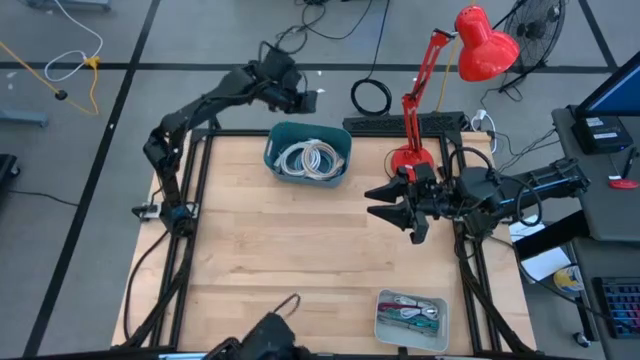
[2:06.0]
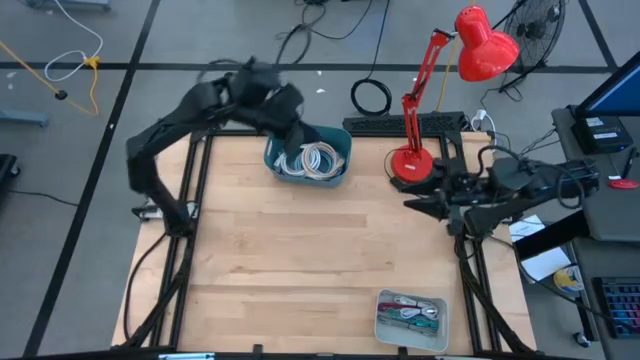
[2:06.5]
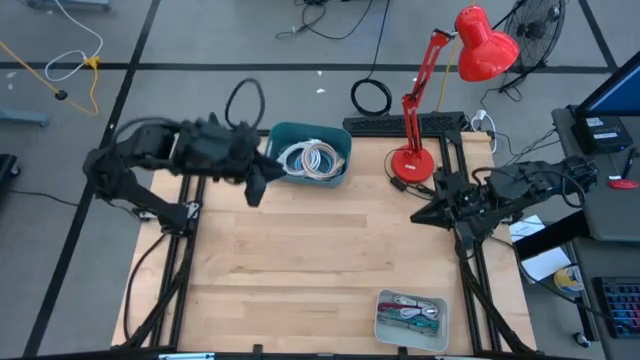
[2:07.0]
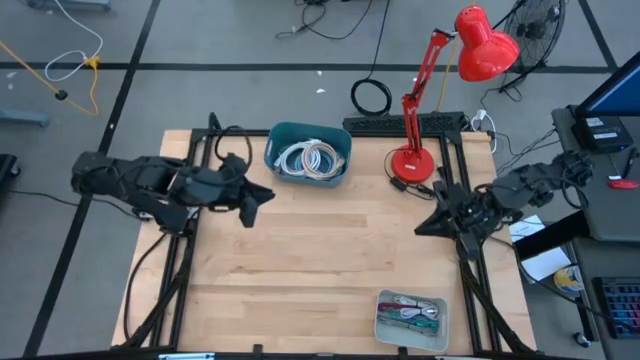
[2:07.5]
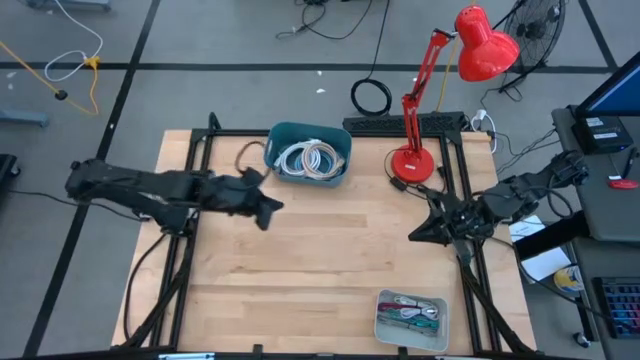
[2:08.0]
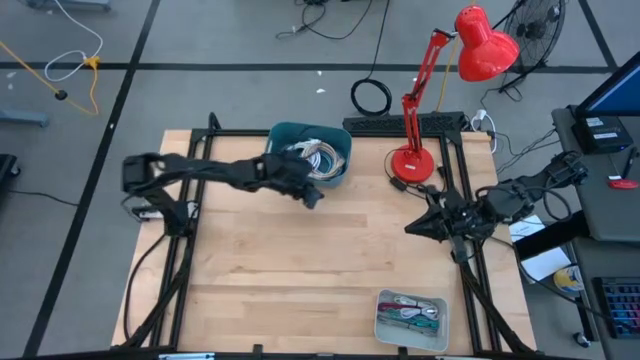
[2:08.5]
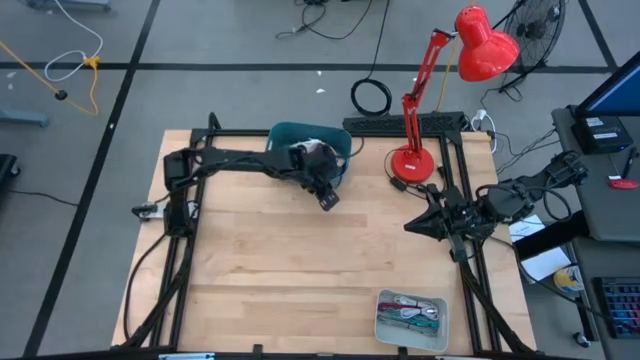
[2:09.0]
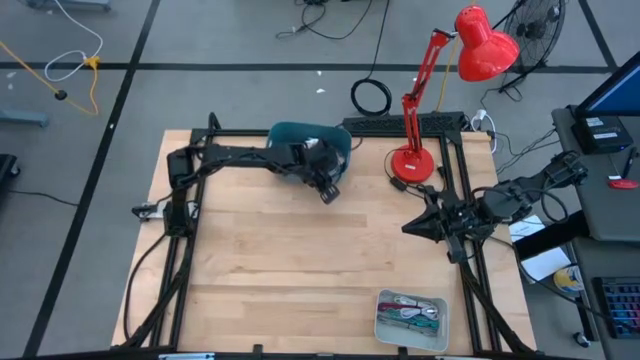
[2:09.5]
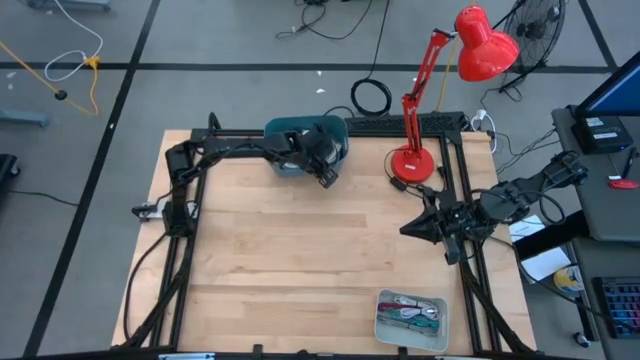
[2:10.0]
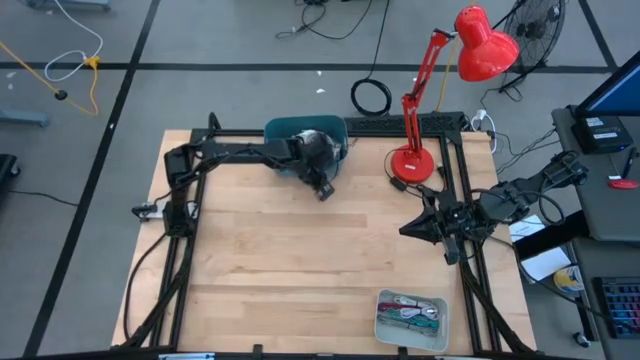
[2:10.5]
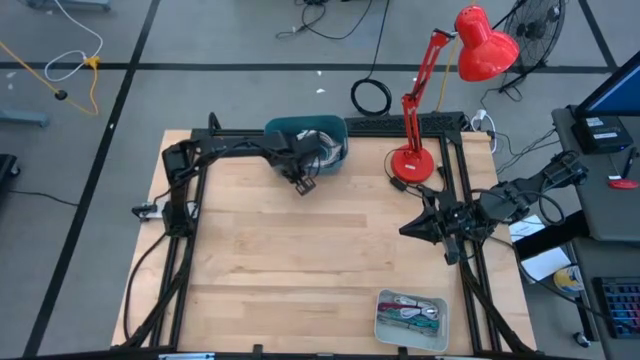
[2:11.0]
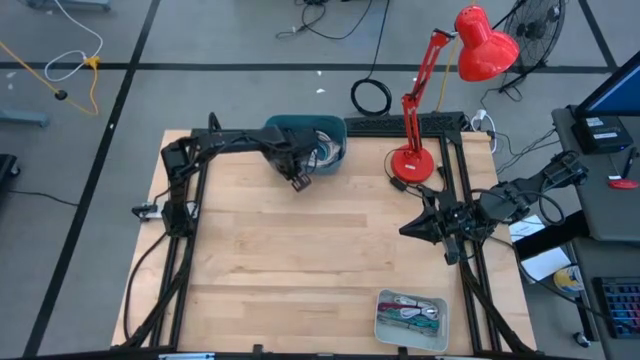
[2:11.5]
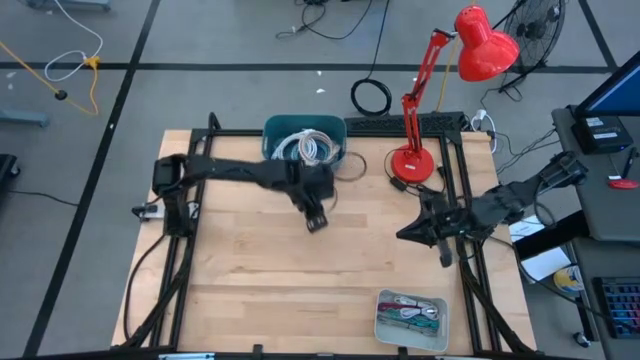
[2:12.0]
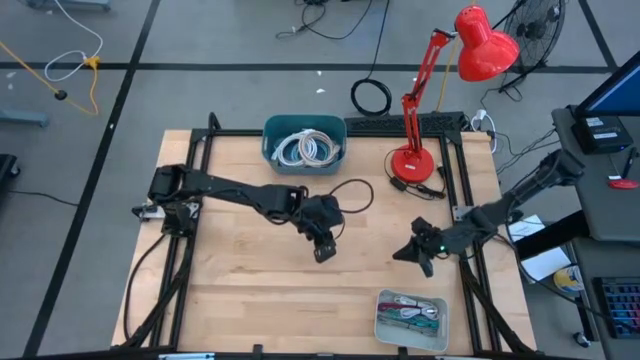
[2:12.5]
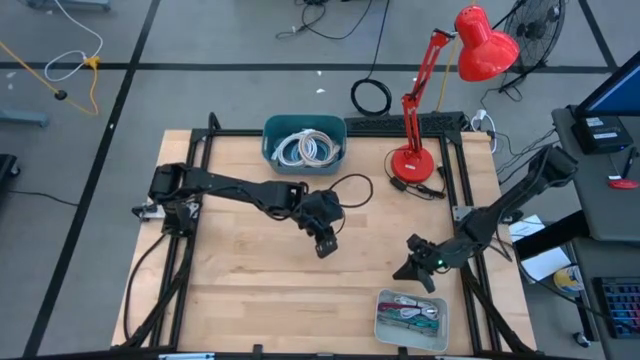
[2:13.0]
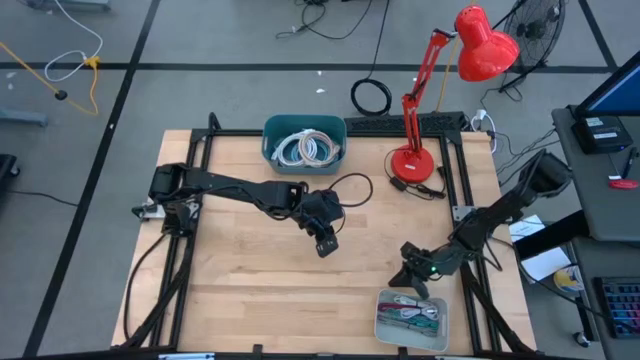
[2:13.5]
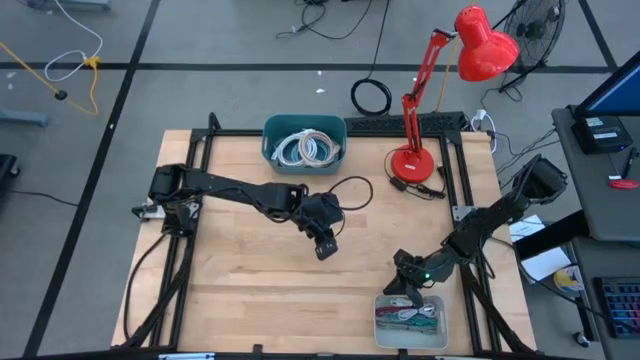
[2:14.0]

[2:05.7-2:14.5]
Task: Sort cables into bins
Adjust the bins on the table

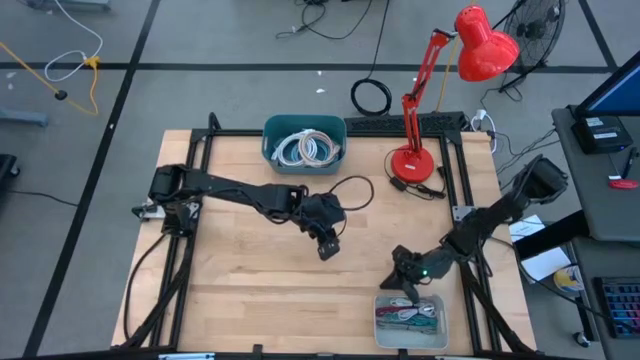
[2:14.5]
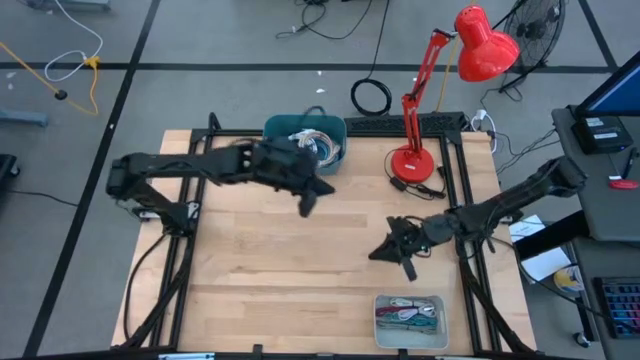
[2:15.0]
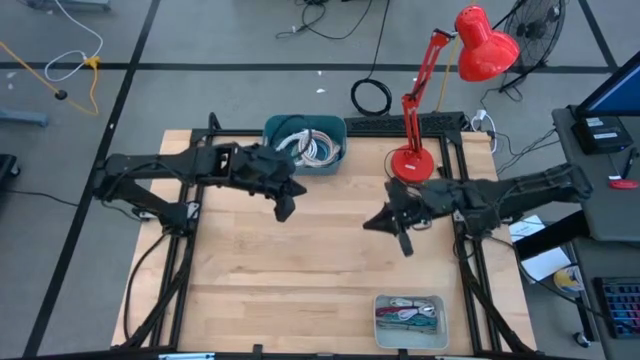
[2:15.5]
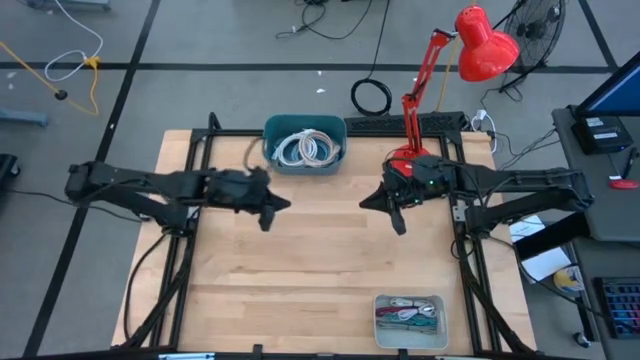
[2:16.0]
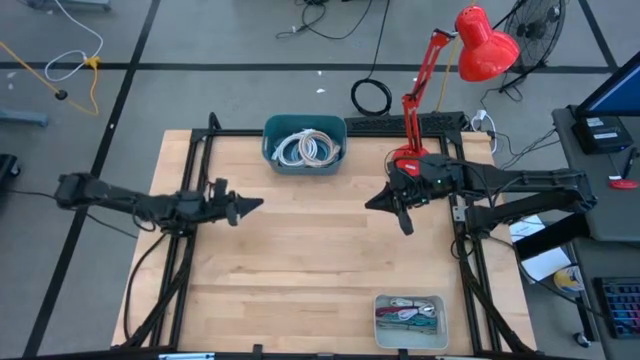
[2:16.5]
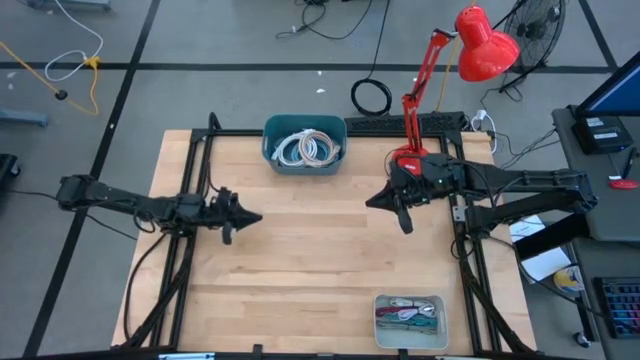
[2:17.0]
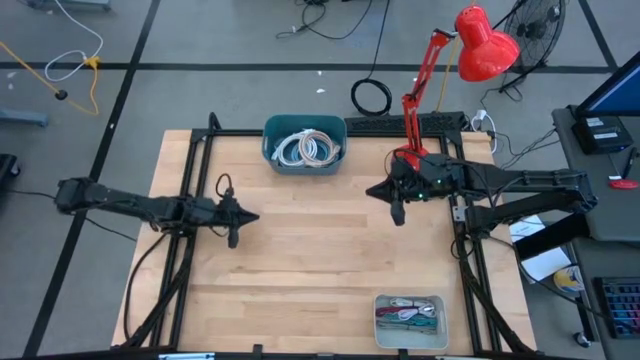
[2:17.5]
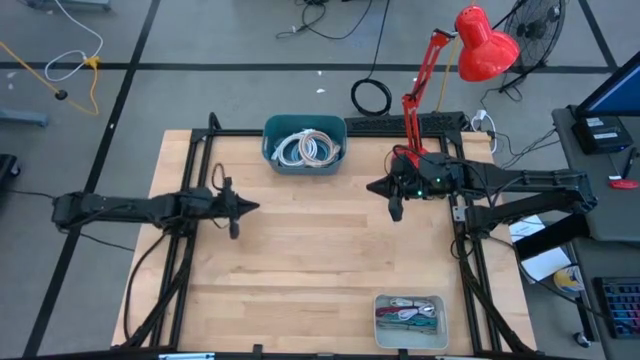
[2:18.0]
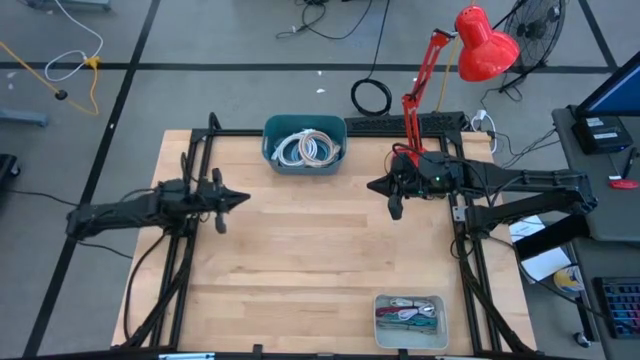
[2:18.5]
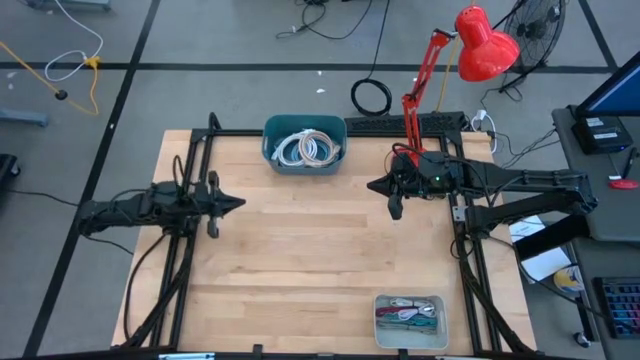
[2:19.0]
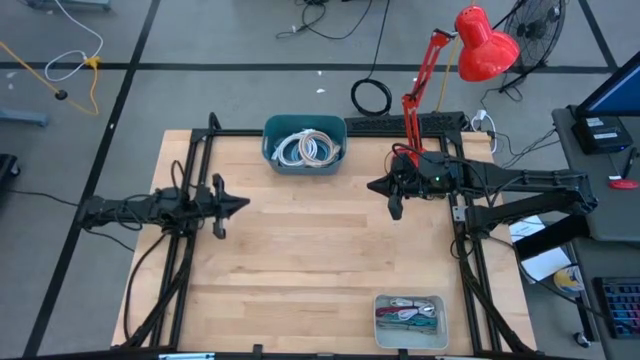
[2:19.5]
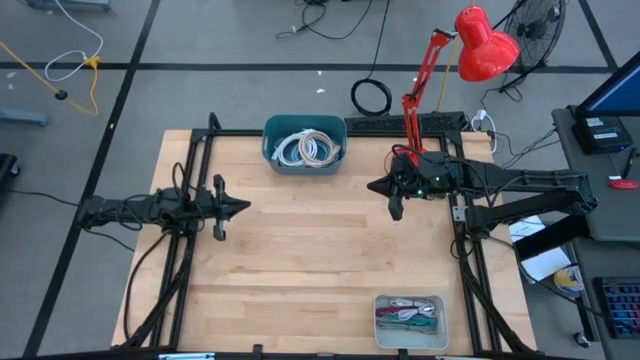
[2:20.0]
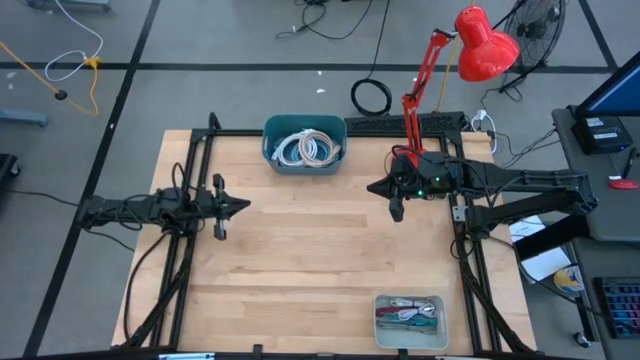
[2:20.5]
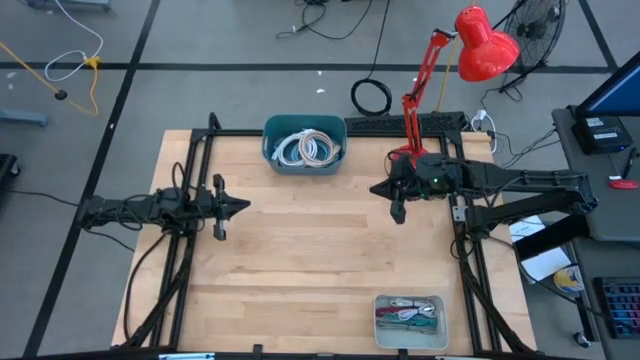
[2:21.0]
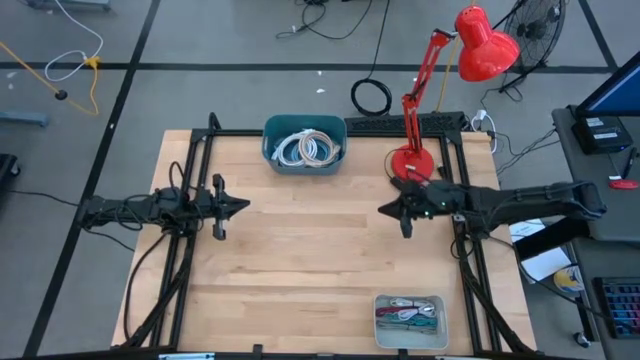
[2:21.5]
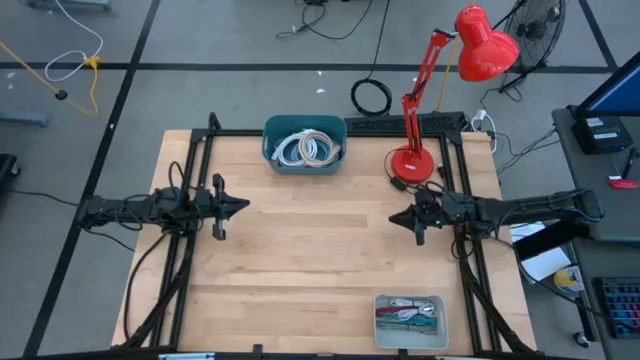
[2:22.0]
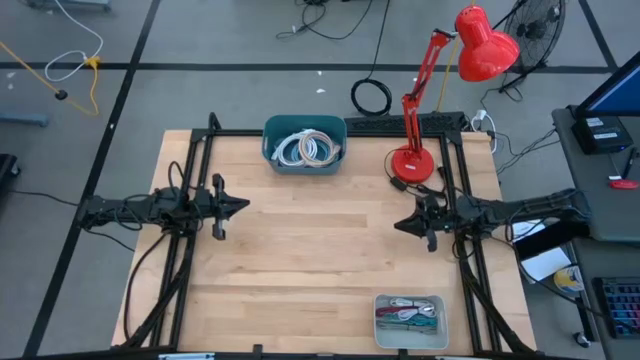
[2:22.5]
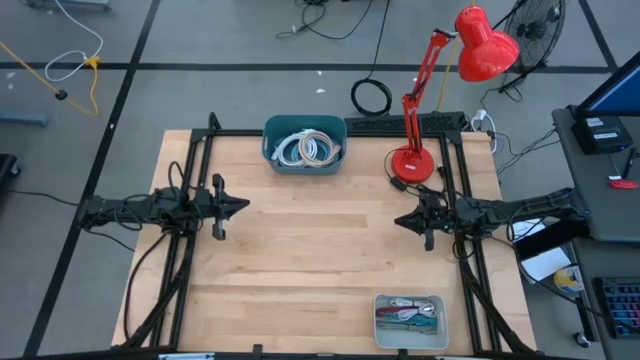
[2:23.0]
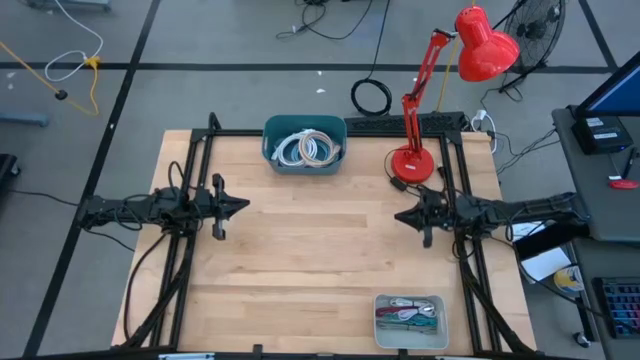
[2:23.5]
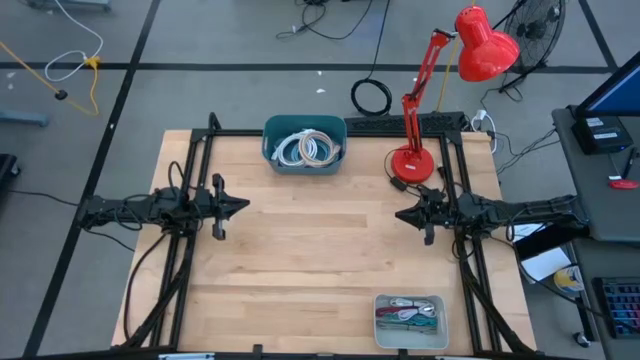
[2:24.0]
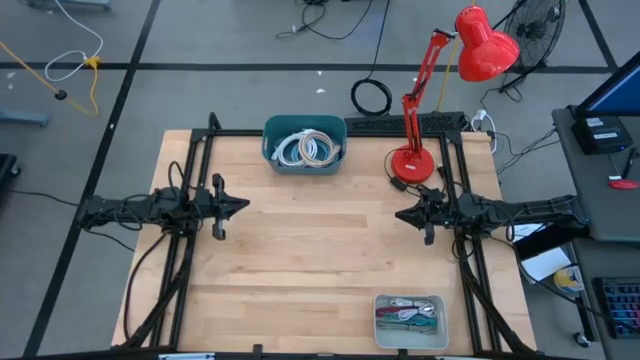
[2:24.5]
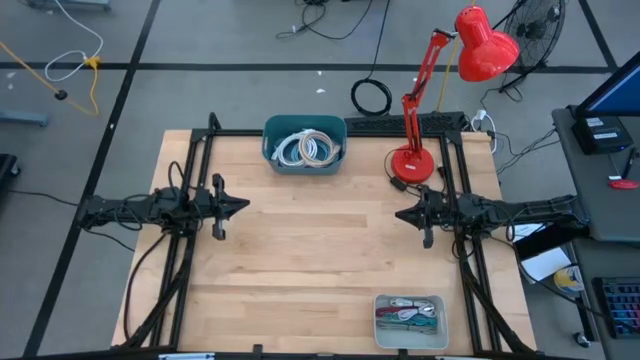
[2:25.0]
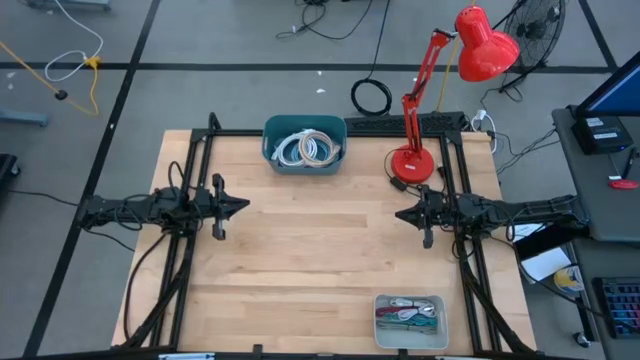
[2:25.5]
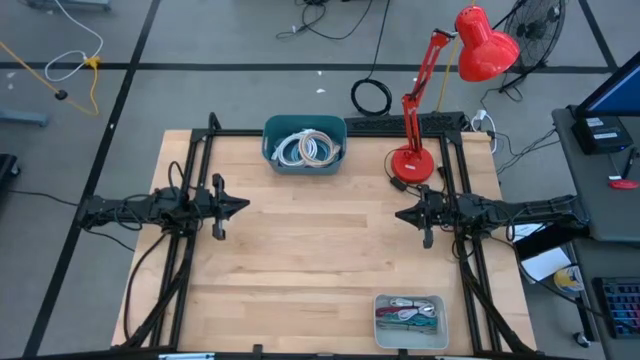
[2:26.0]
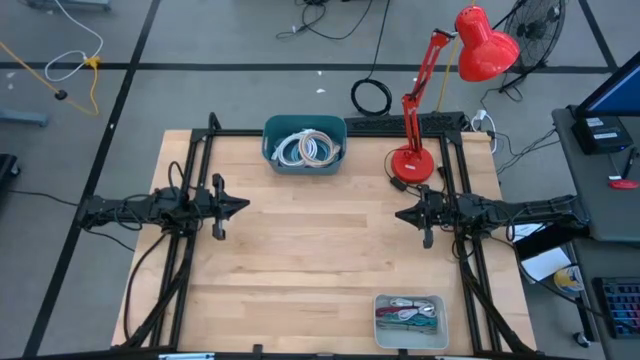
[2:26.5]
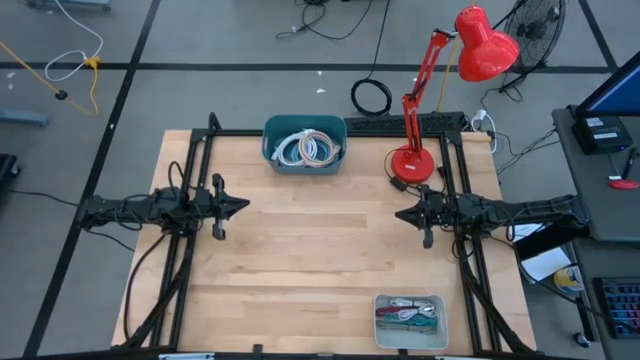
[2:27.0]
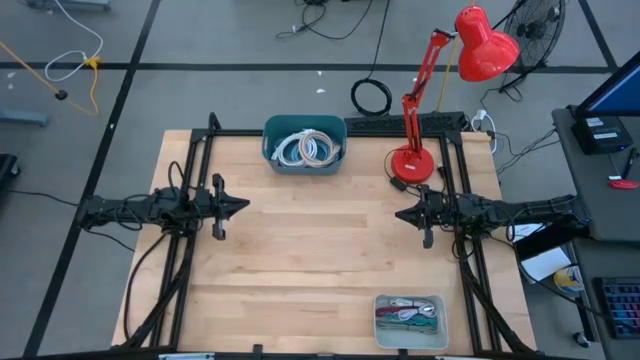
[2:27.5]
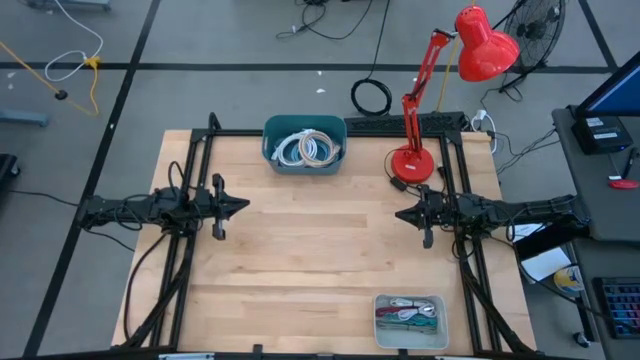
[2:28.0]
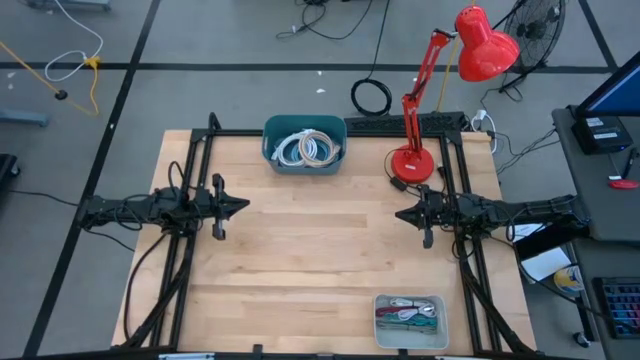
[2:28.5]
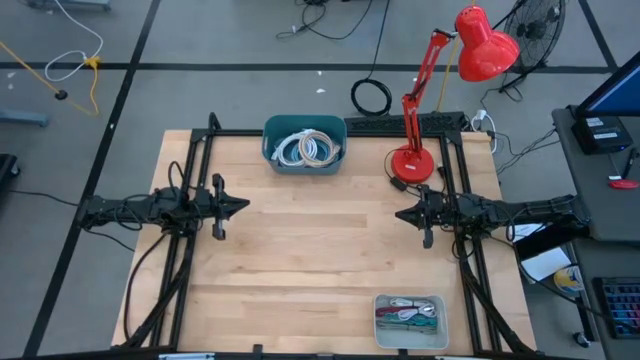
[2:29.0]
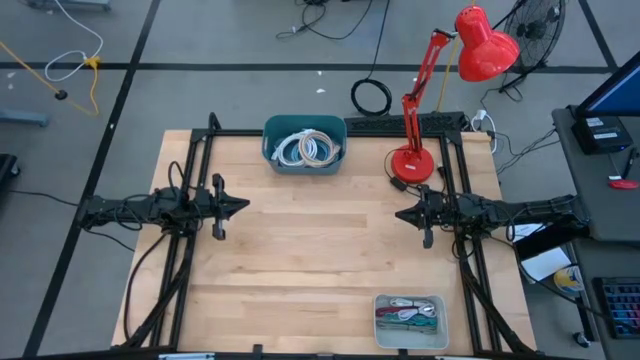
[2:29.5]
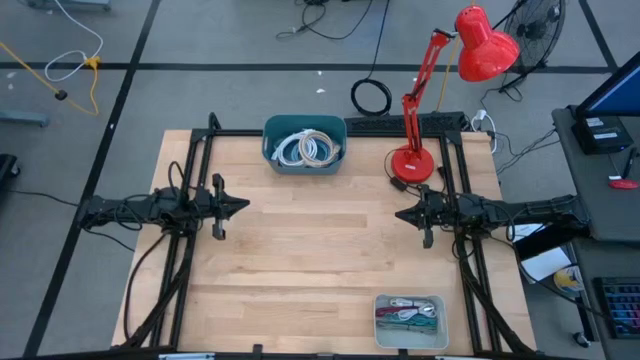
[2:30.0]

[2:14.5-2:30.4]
Return to Home Position
